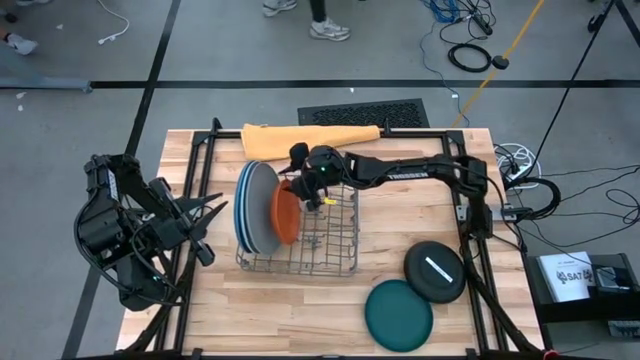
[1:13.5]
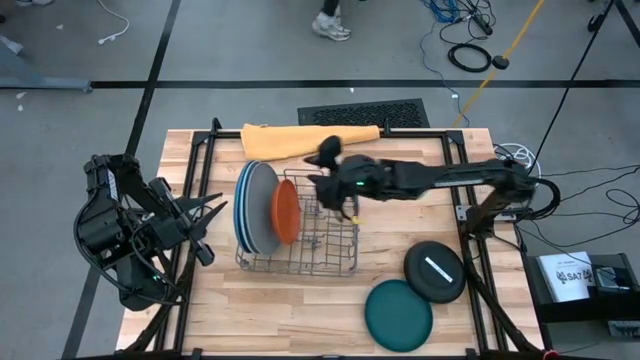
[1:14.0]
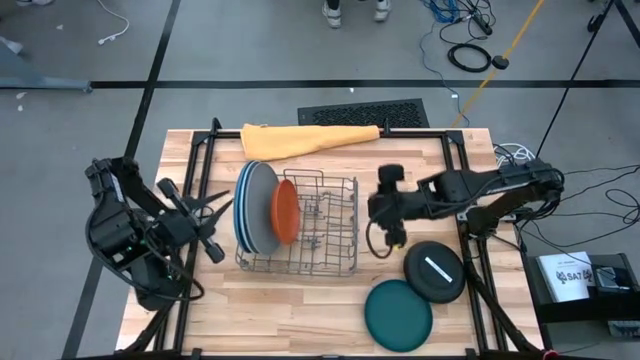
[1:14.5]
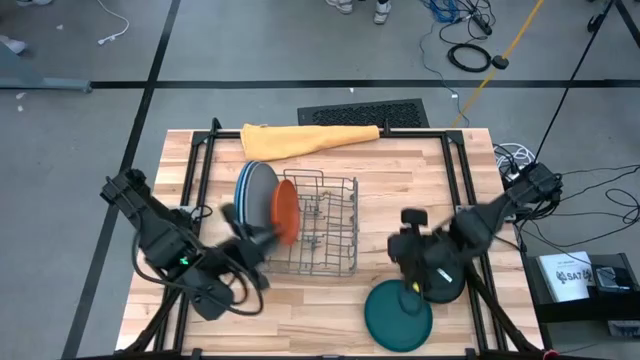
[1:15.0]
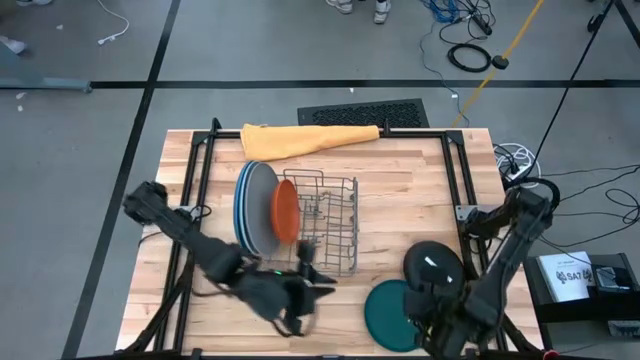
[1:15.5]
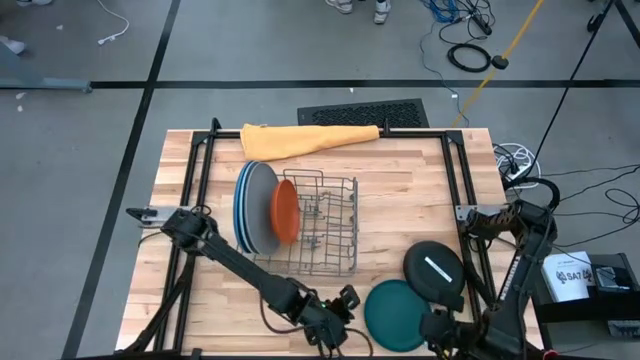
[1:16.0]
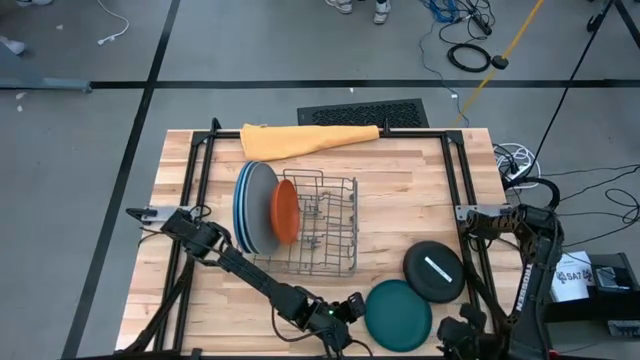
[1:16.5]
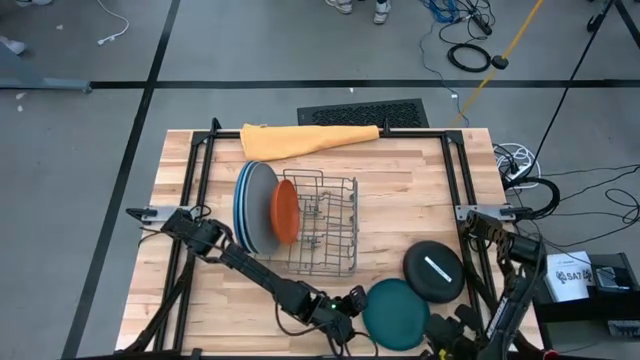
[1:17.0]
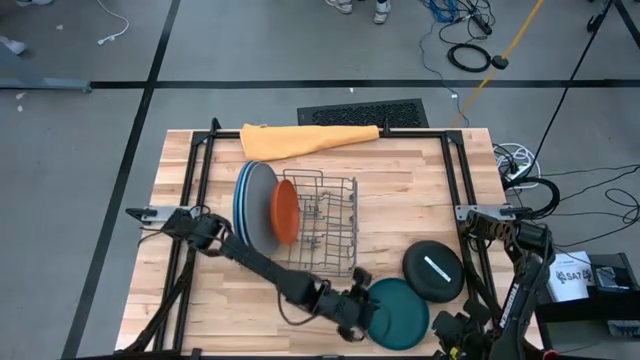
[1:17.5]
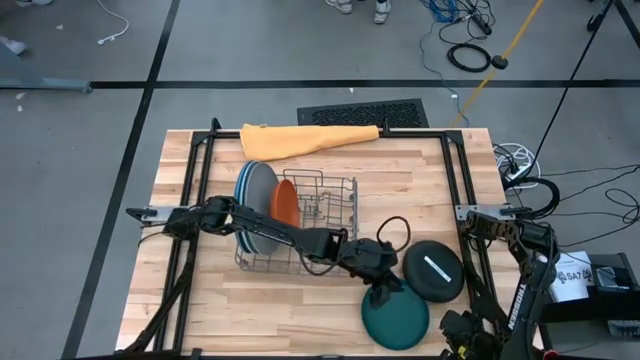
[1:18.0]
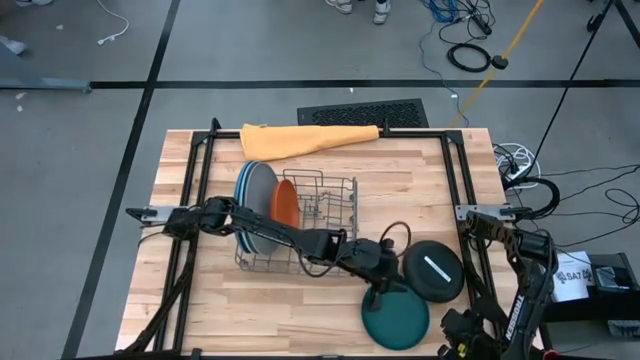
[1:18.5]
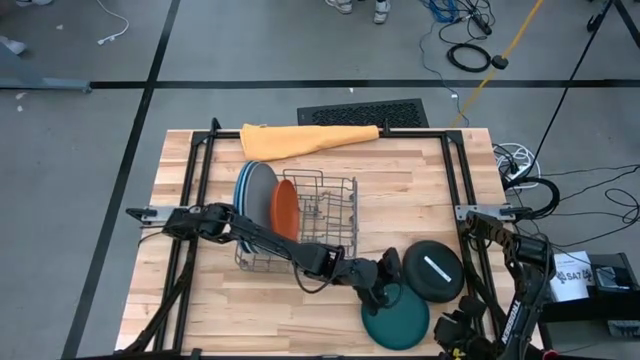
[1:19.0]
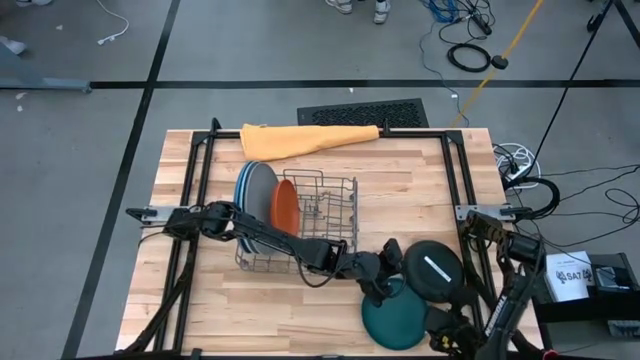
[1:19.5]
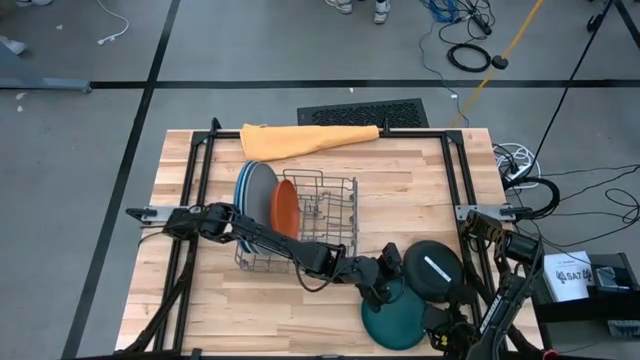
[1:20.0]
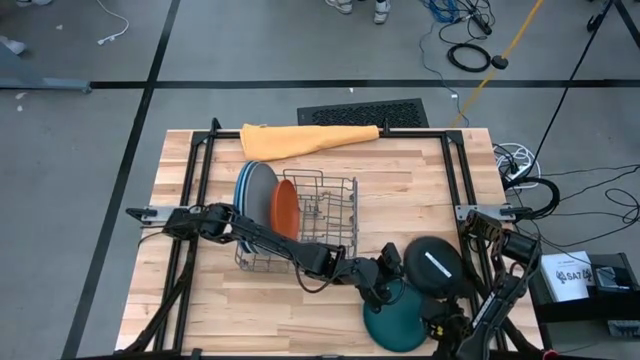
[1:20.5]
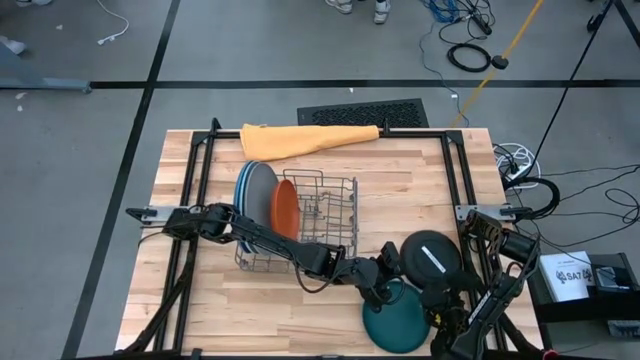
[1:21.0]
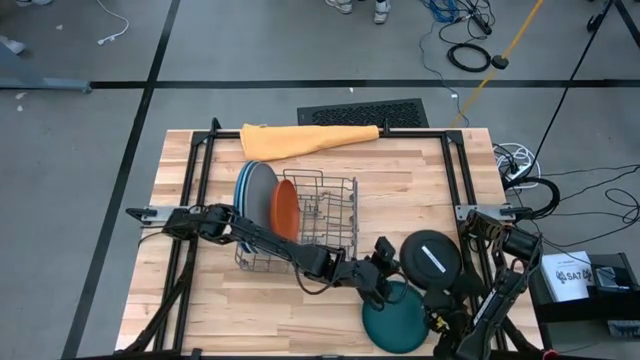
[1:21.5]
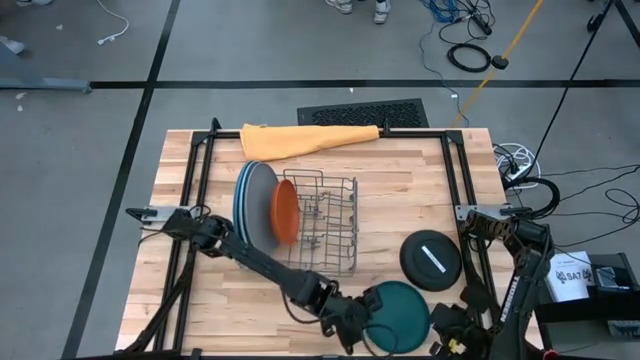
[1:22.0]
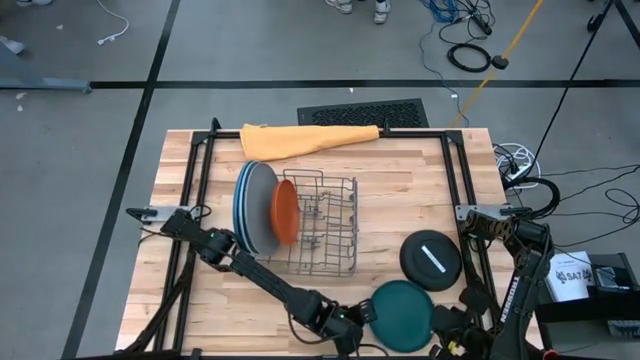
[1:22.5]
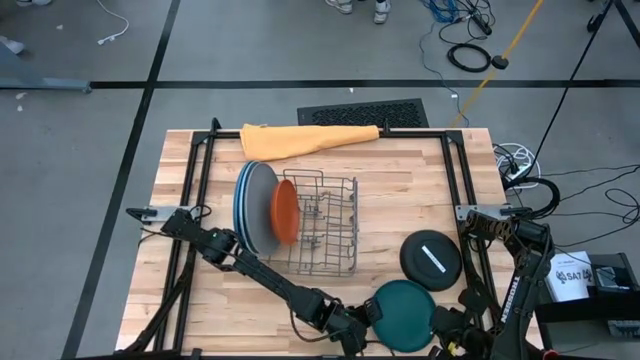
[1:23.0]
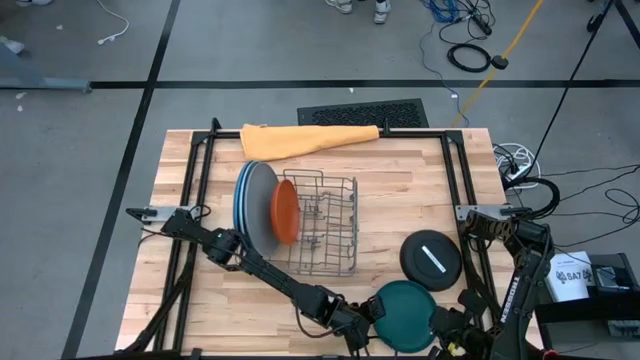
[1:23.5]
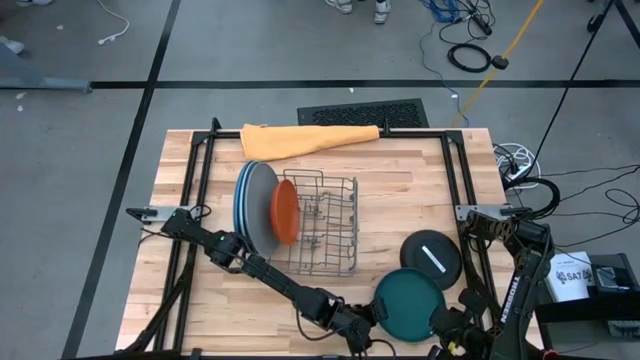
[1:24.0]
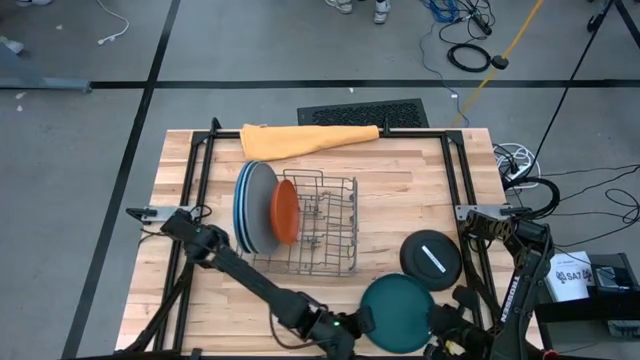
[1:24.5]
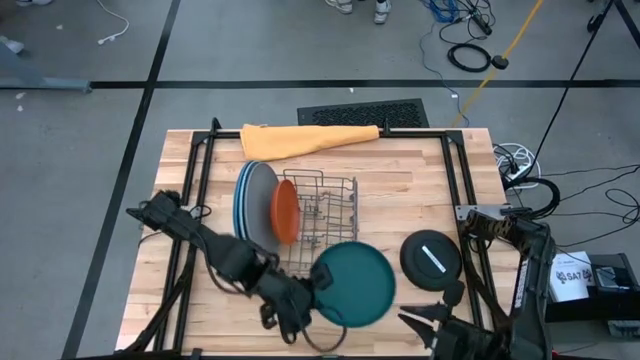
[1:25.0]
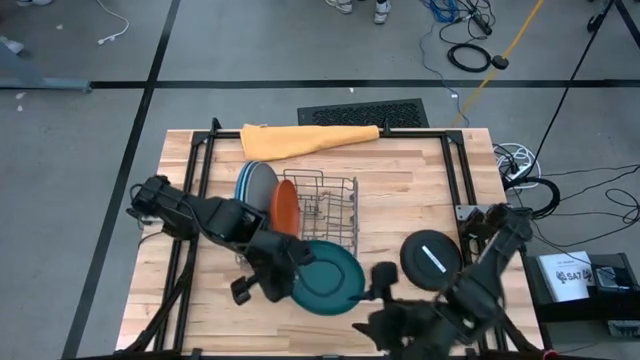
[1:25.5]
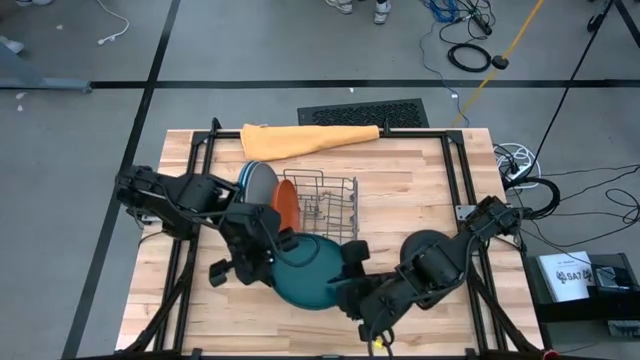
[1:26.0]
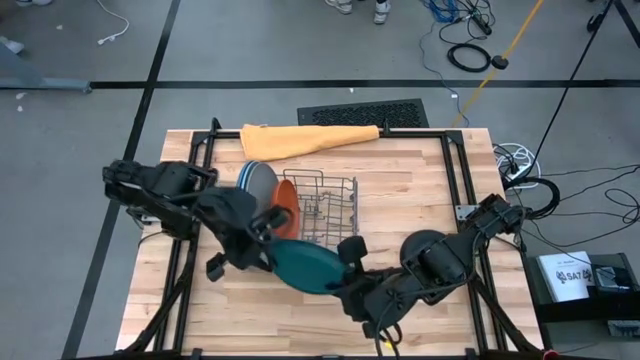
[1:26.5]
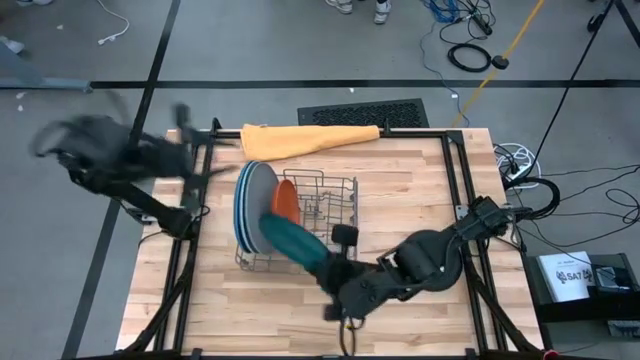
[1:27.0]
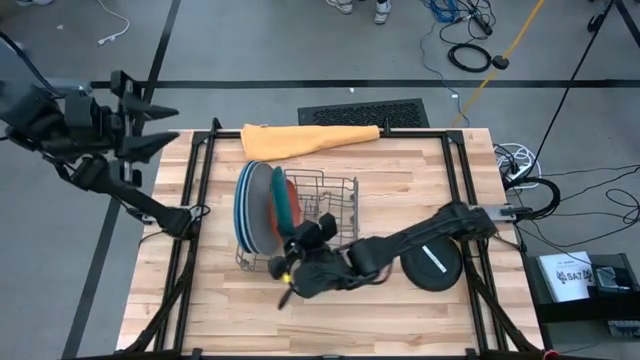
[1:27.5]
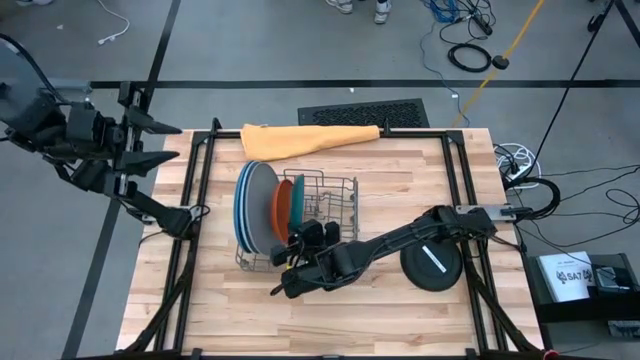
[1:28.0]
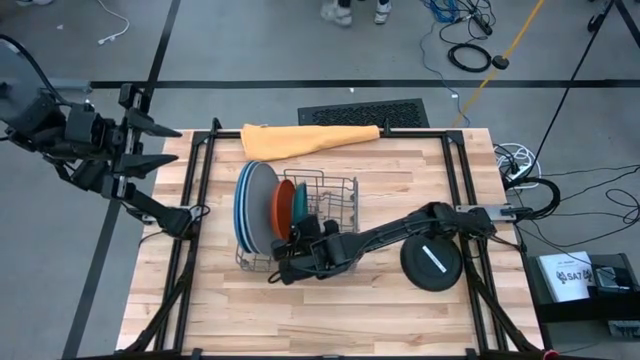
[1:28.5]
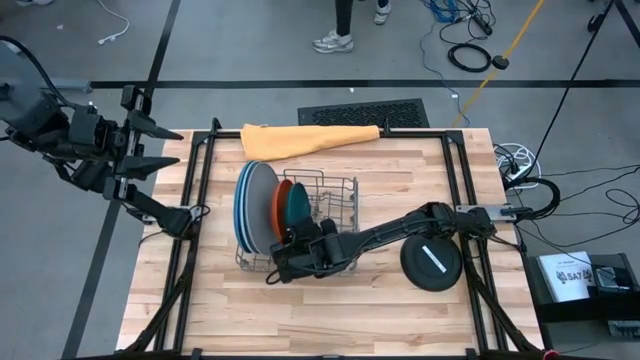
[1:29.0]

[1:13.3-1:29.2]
Task: Sort dishes
Put the green plate in the dish rack

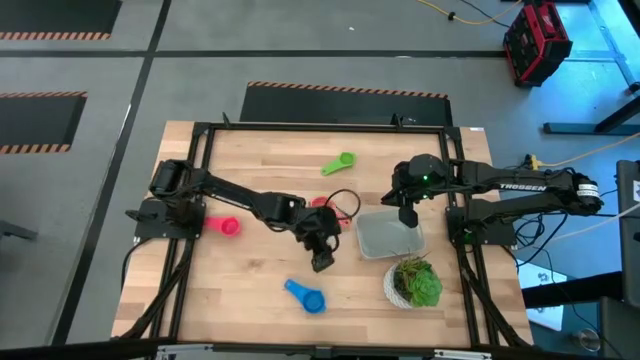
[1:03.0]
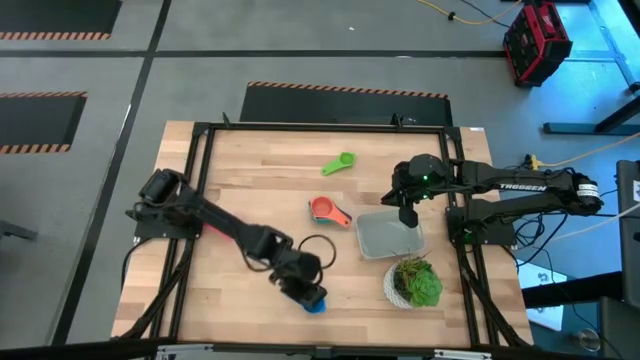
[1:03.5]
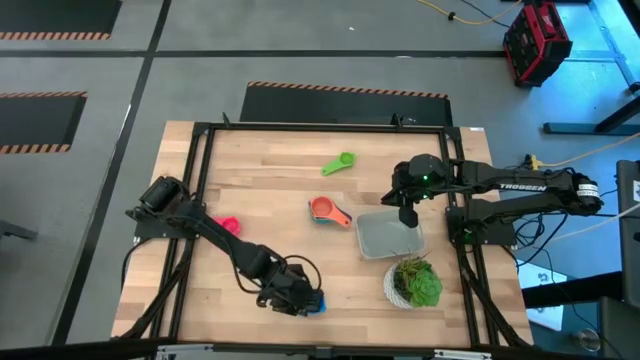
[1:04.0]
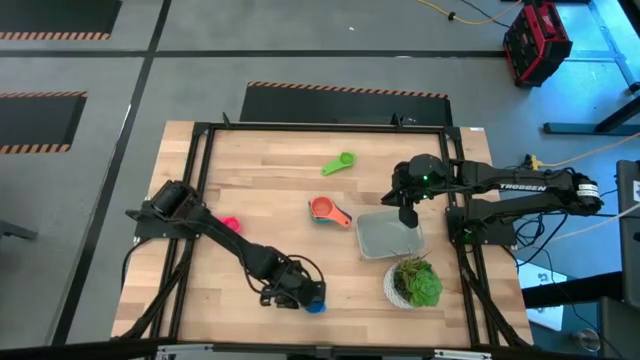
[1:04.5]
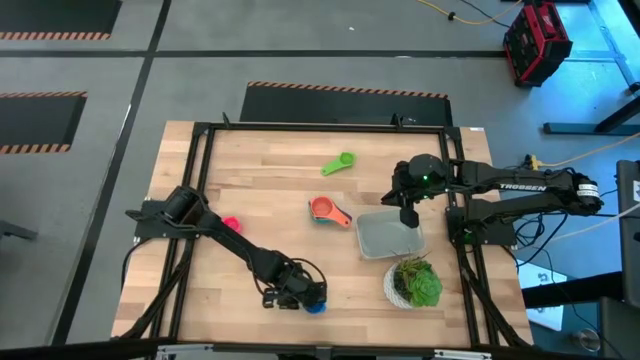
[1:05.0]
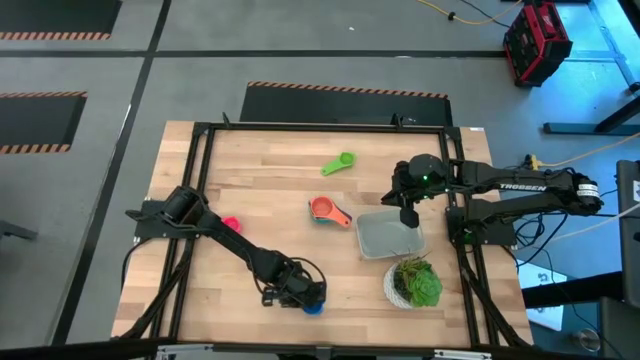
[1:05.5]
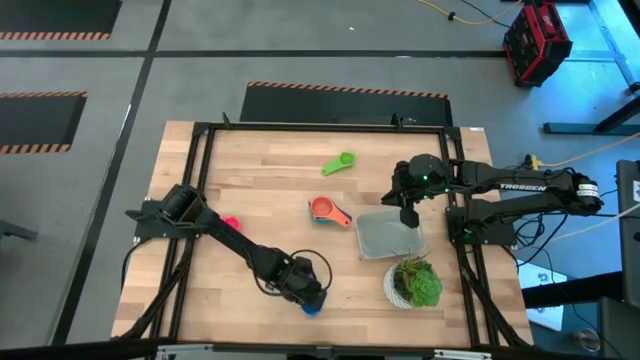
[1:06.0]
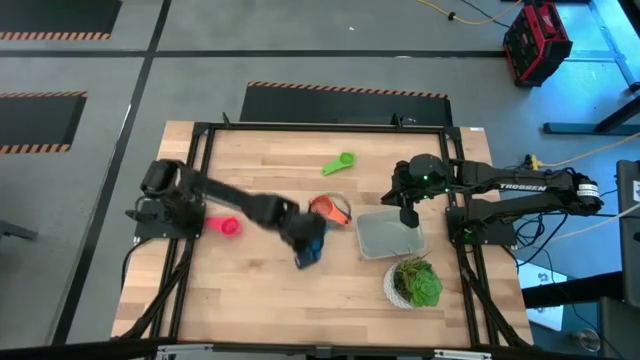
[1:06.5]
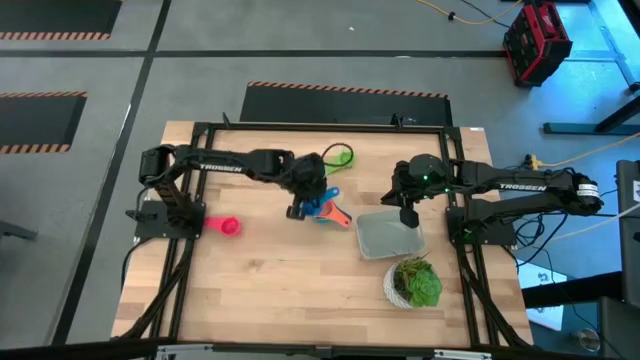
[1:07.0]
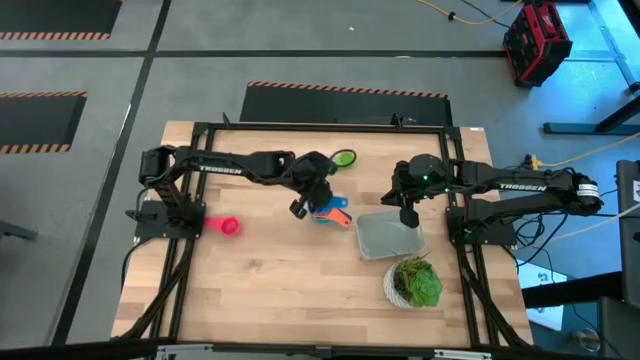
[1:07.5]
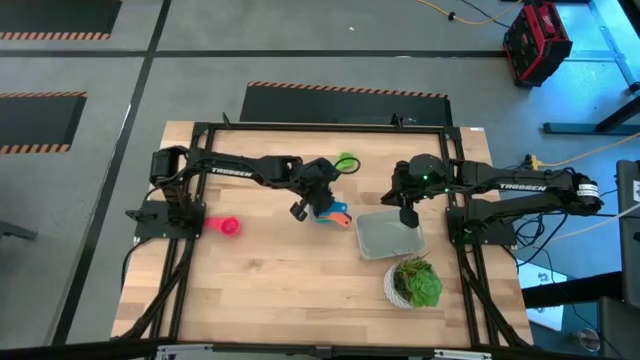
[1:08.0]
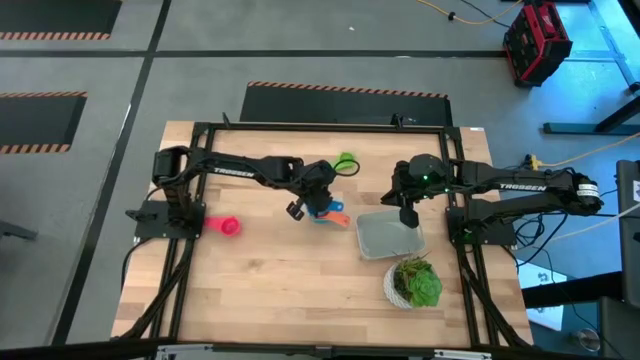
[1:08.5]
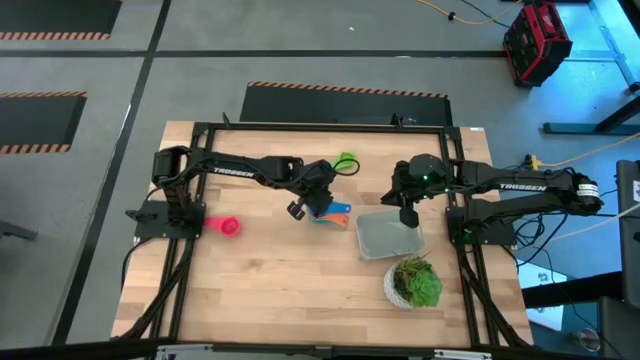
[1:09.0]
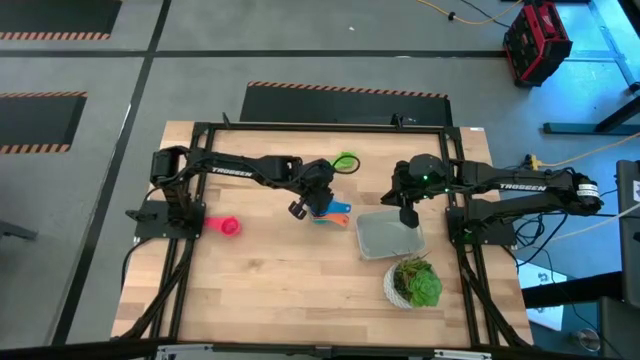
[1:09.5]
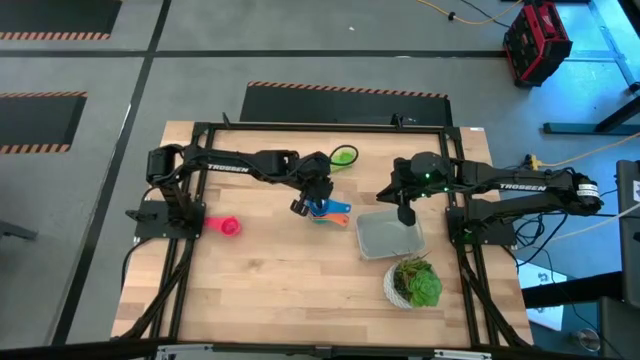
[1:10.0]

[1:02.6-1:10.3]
Task: Nest measuring cups in basket
Stack the blue measuring cup on top of the orange measuring cup
